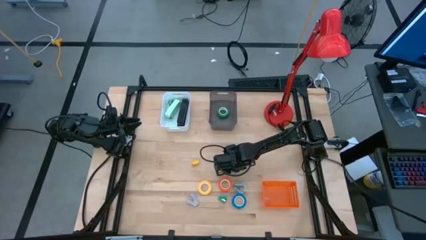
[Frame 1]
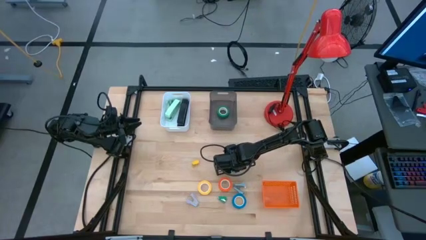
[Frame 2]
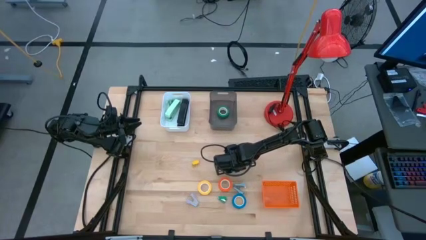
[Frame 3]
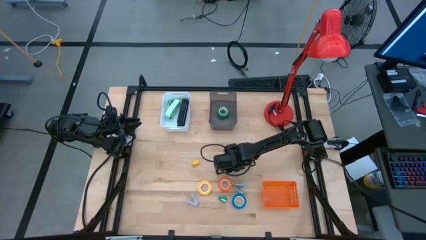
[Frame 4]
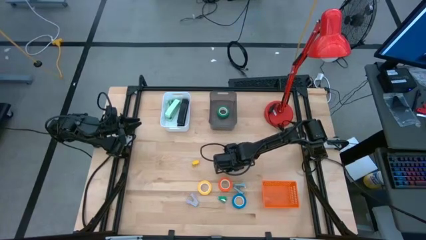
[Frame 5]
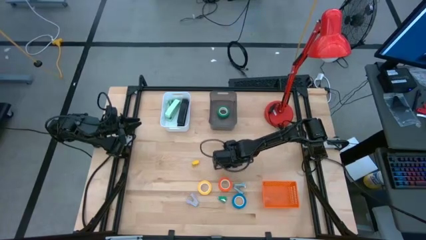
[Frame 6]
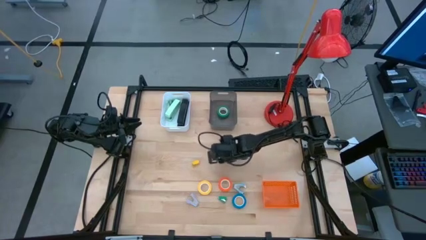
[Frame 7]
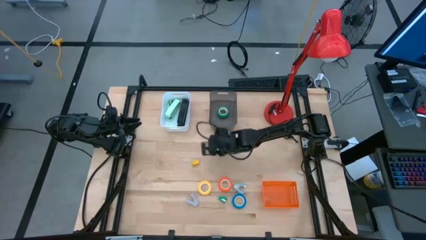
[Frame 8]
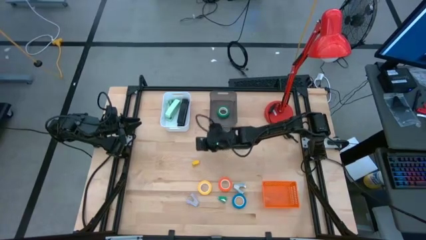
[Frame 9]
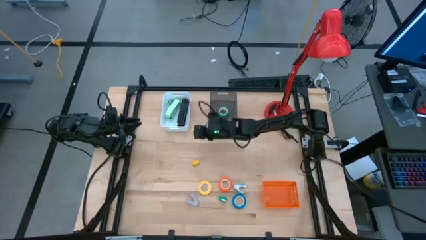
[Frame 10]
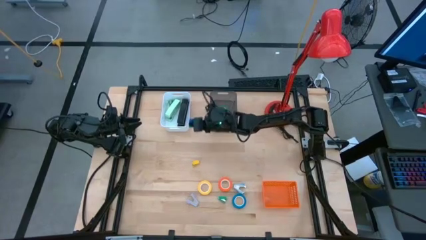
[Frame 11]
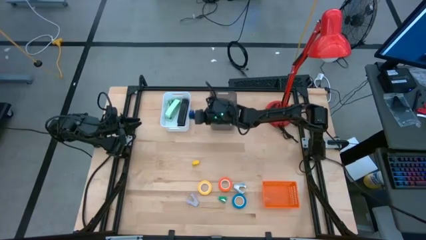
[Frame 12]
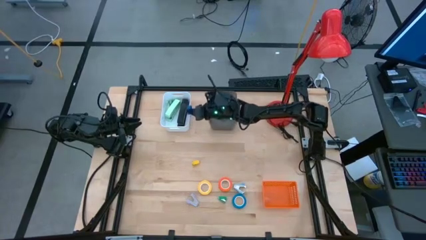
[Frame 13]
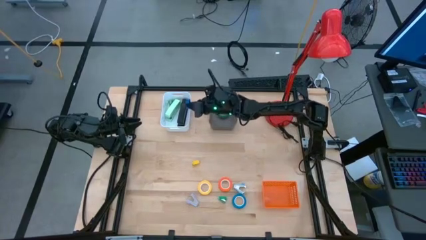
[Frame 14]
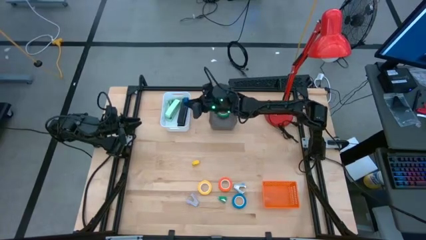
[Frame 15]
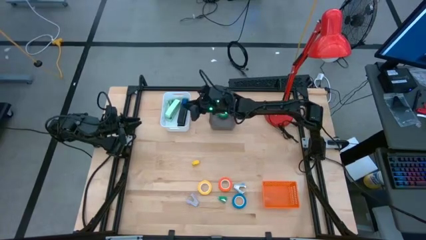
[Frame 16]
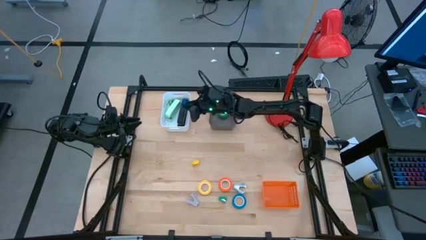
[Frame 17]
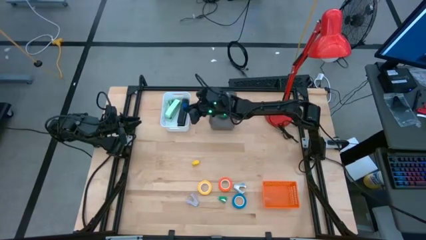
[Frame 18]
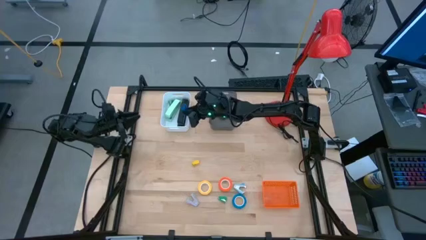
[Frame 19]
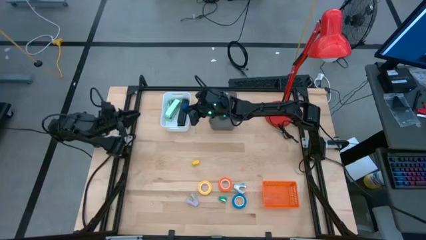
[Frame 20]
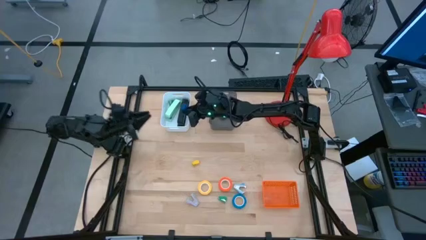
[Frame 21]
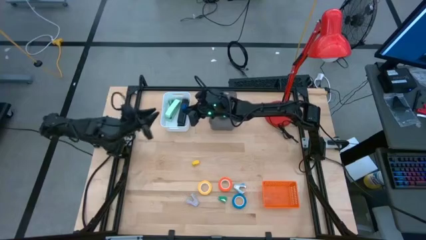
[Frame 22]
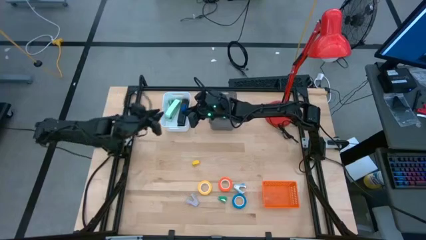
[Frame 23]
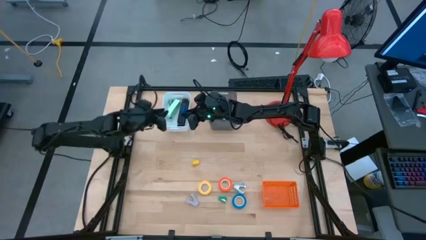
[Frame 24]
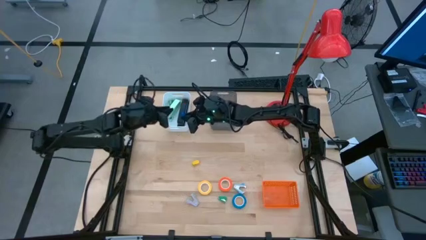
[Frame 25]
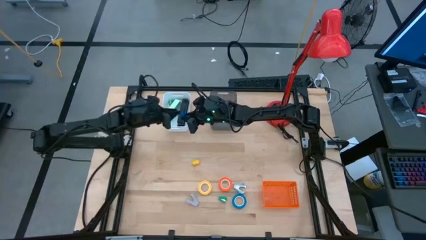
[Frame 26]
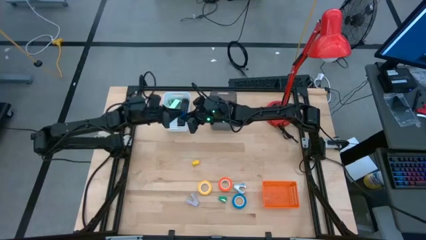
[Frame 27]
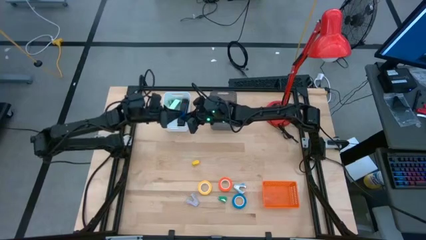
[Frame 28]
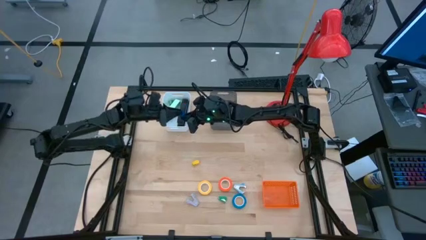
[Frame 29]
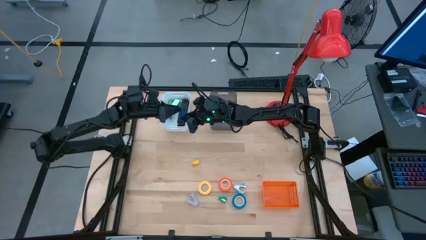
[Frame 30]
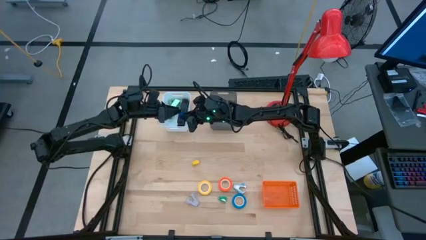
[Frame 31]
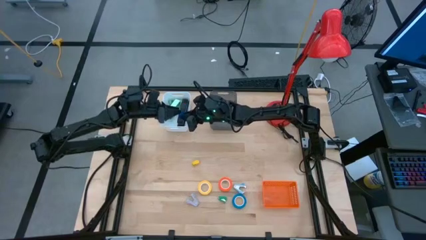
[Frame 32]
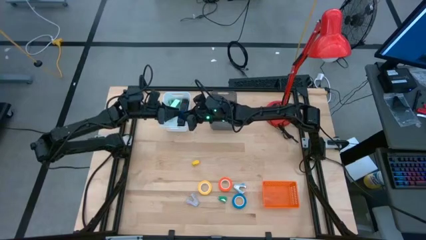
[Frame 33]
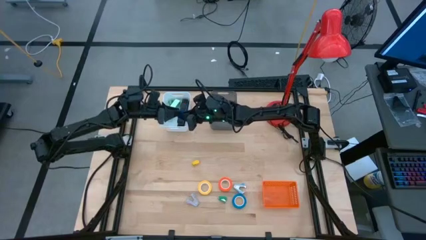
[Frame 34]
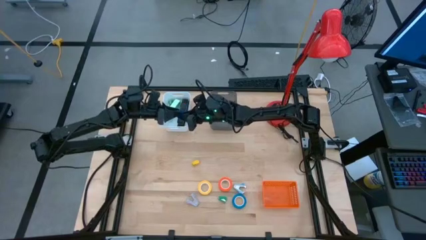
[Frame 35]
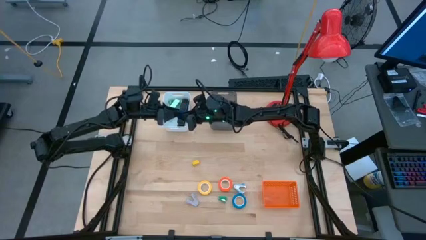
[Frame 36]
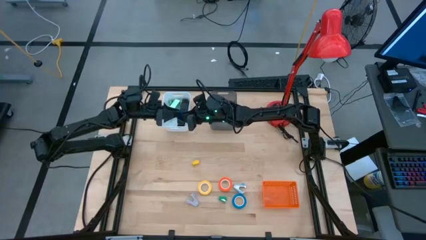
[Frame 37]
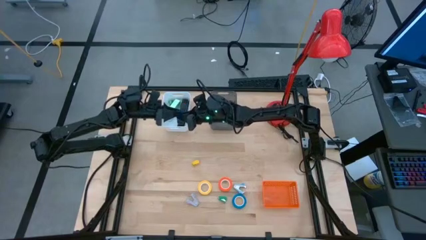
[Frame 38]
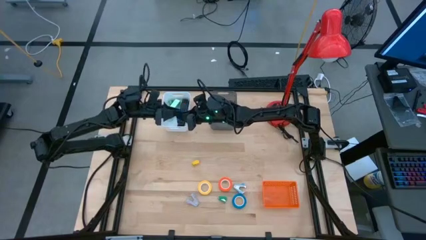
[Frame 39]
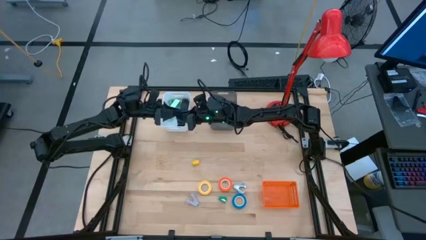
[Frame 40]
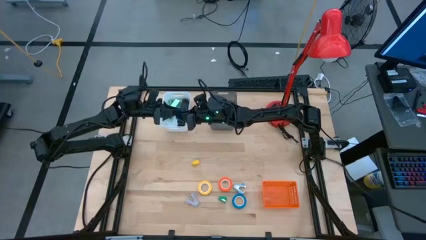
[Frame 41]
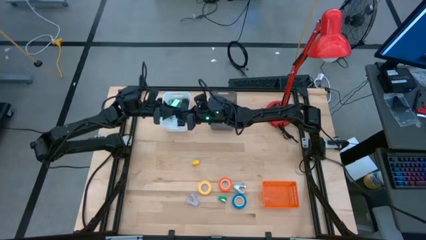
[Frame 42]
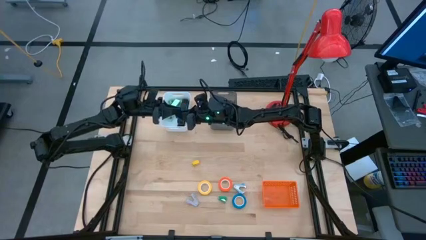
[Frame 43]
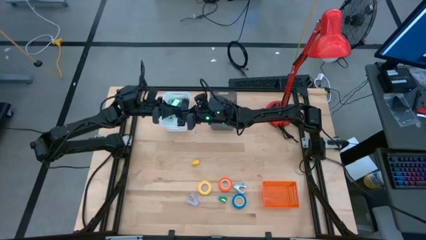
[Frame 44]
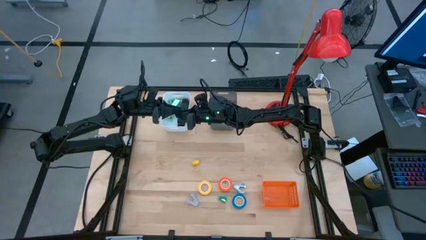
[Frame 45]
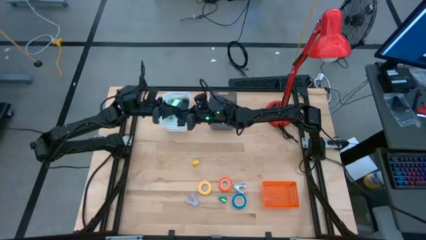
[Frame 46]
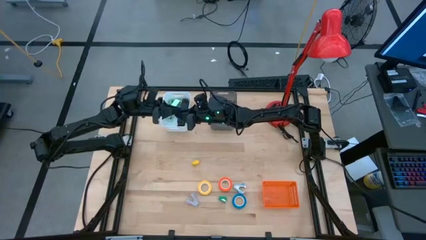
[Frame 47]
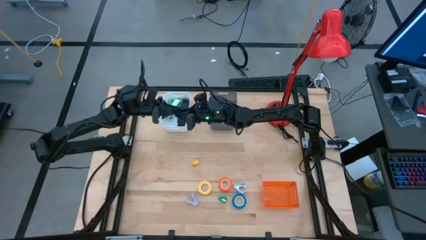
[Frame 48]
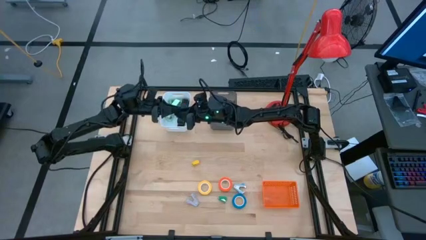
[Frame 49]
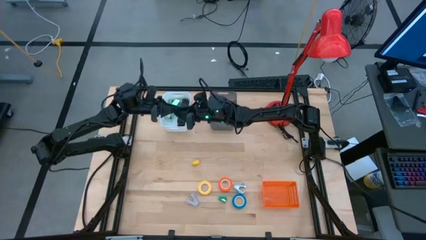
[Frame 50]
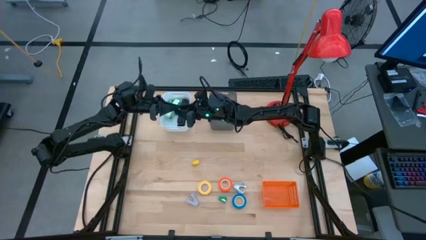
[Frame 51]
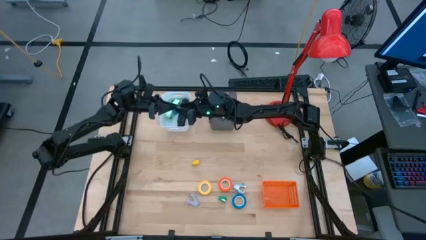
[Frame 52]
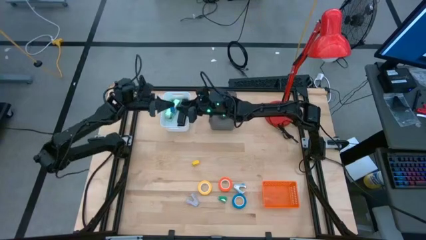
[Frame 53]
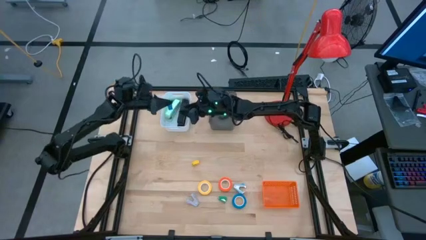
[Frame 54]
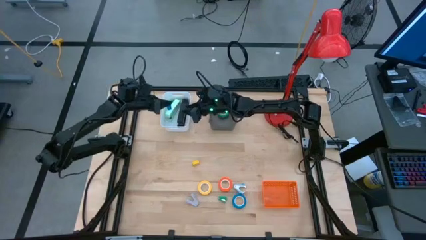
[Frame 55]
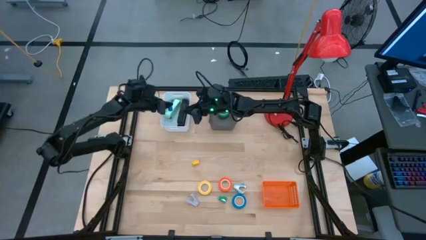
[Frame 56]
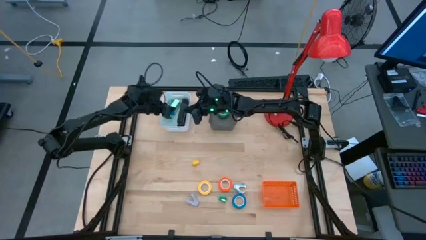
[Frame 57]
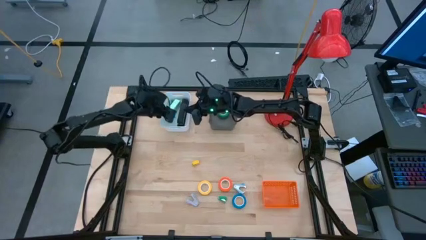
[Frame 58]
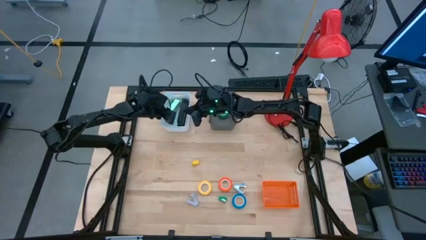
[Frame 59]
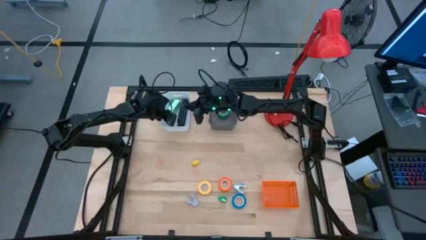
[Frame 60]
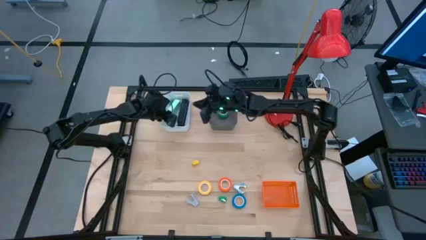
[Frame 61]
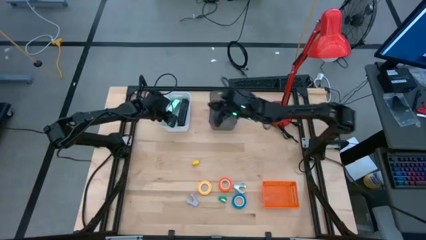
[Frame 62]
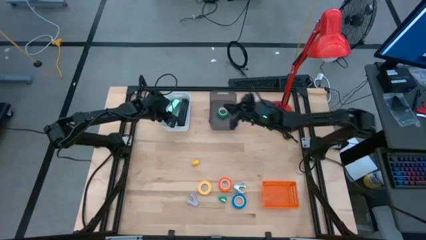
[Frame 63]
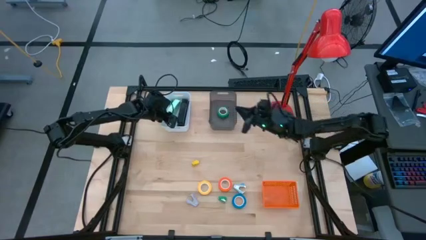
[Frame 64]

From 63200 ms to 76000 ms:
Task: Pick and place Stapler, Stapler remover, tape
Put the small blue stapler into the white bin

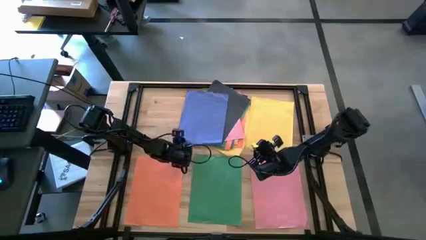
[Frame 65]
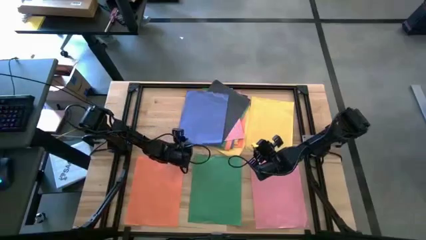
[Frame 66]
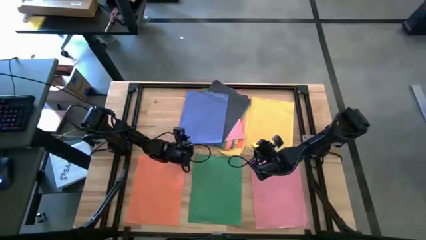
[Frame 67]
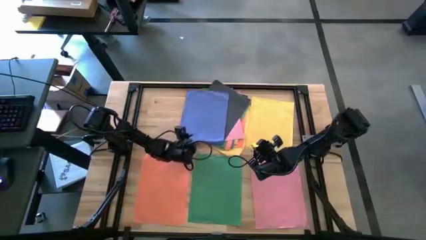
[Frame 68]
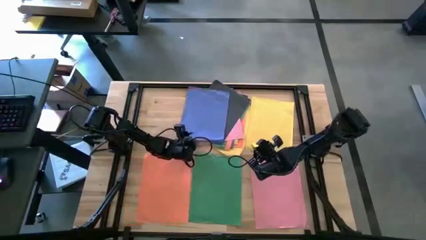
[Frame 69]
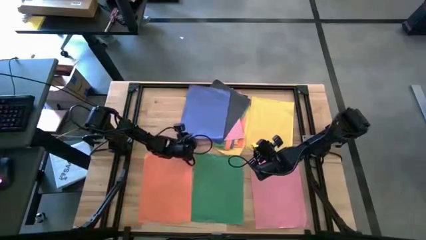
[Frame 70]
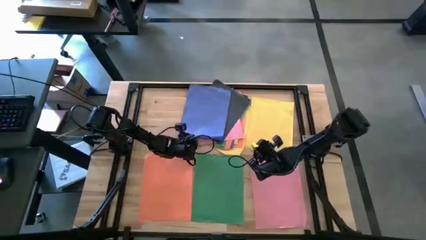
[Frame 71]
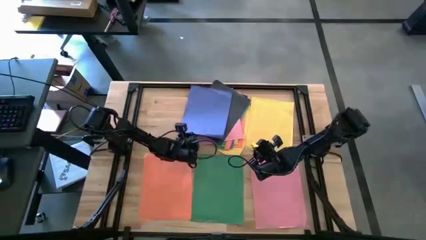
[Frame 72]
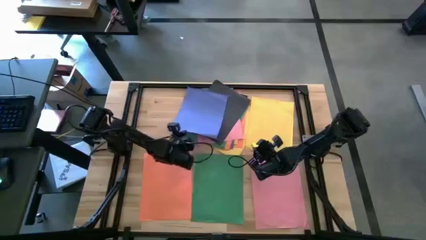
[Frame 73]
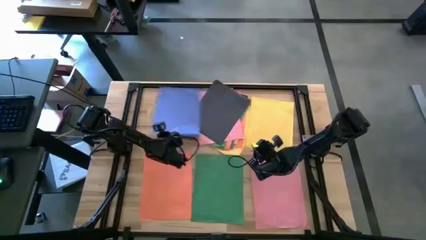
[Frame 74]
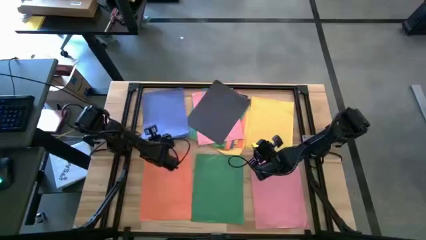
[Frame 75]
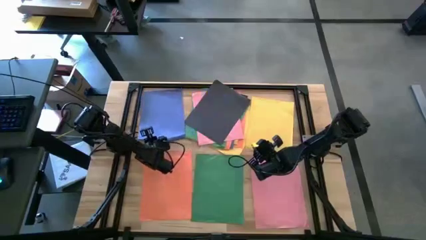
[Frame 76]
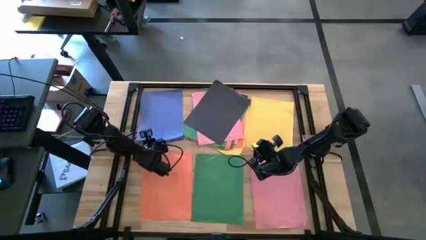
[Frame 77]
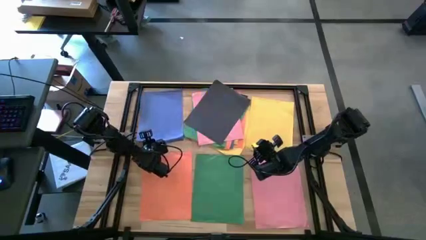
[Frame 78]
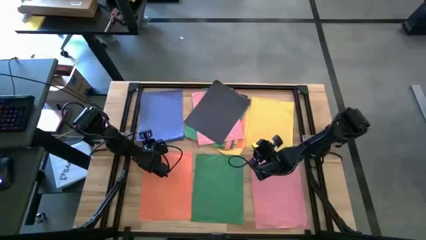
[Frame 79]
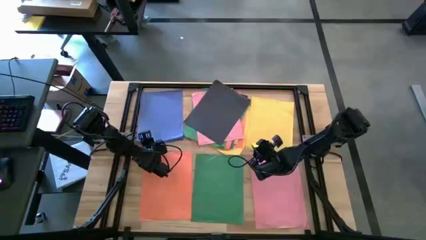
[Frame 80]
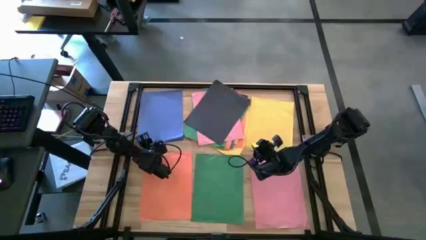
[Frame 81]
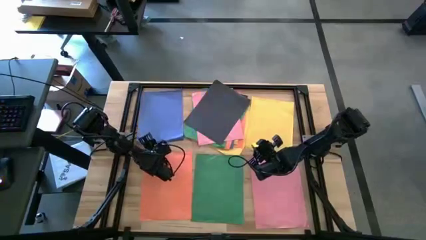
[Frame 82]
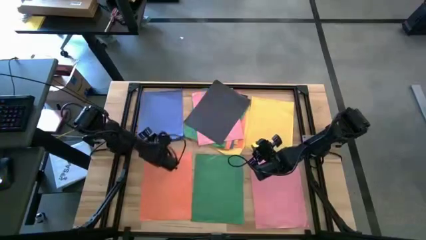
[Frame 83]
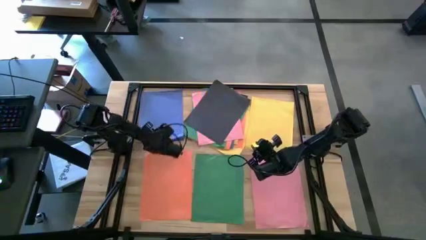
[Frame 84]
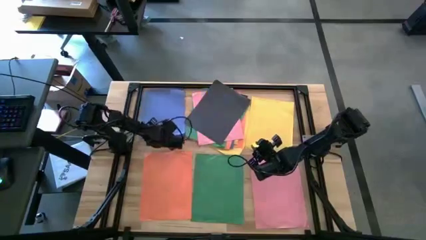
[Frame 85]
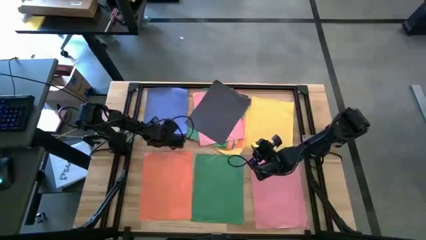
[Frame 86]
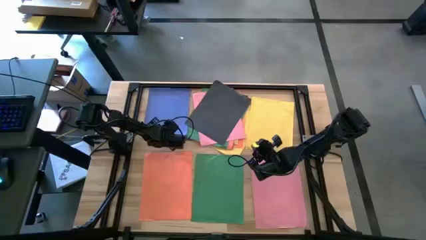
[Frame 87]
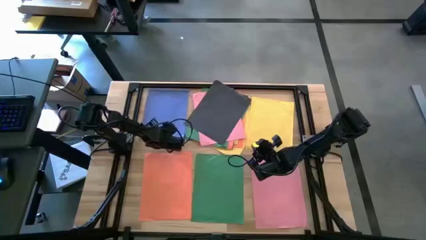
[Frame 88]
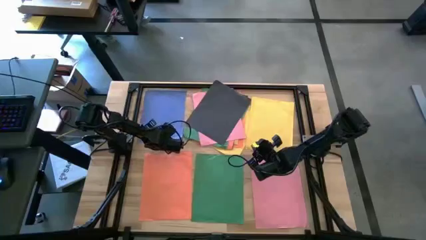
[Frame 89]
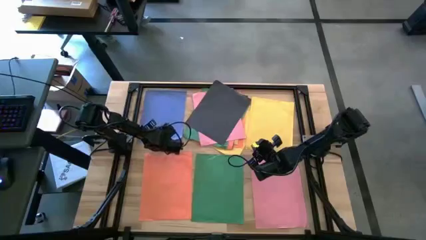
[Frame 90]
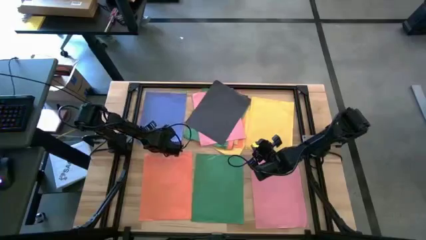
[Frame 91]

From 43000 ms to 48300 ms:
Task: Organize paper
Move the blue paper to the upper left of the table
